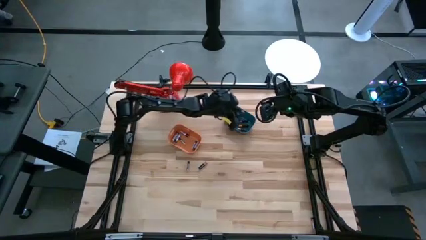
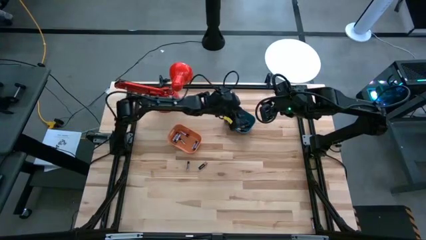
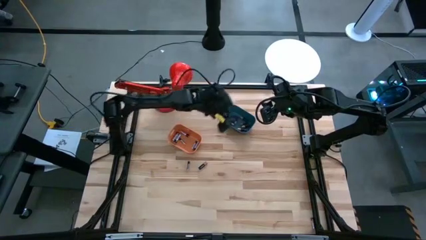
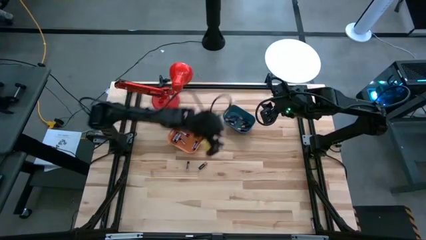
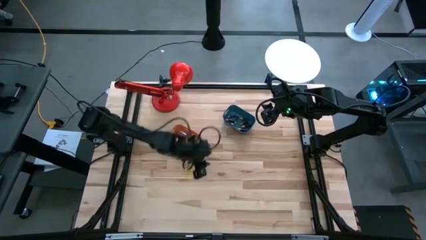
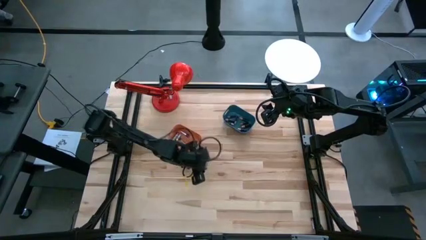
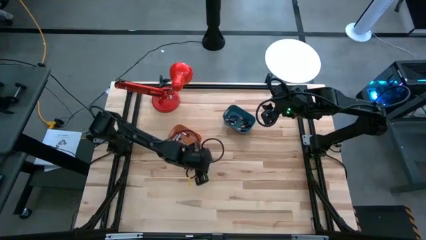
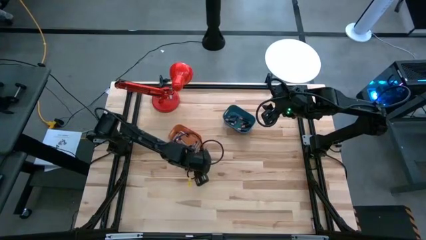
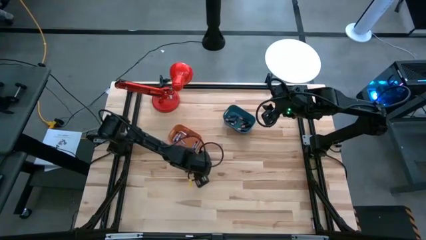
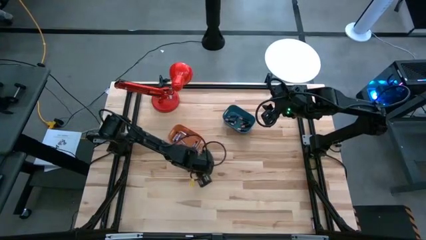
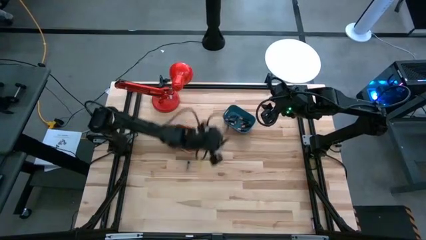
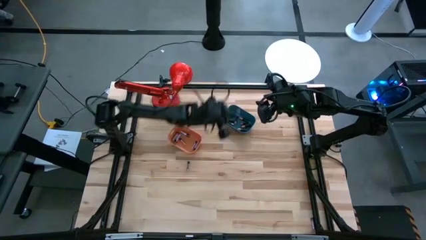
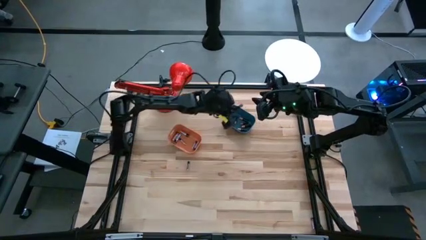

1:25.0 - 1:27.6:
Task: Sort batteries
Put the black battery into the blue bin

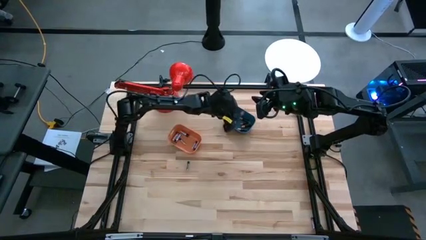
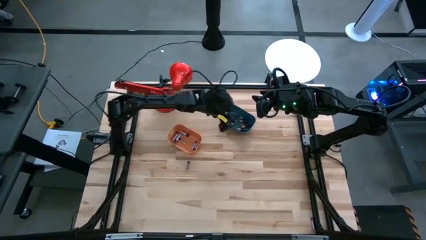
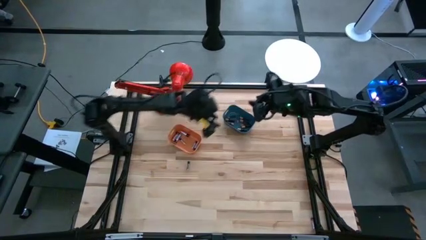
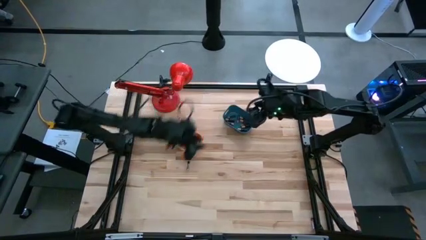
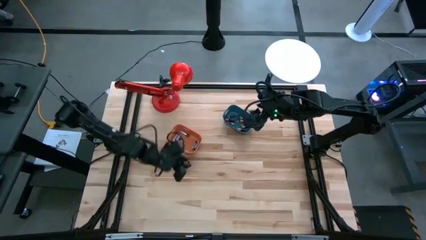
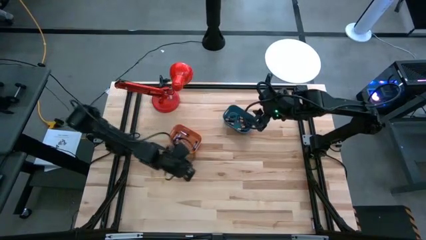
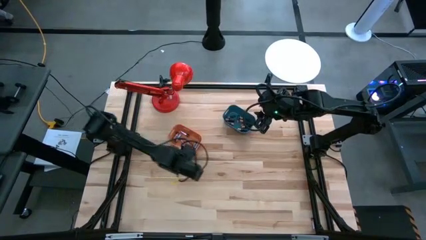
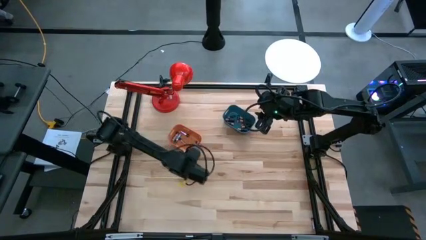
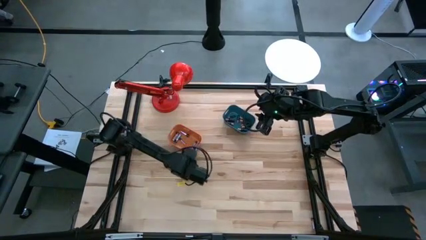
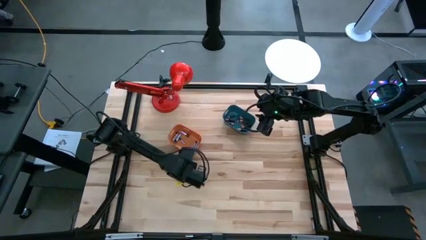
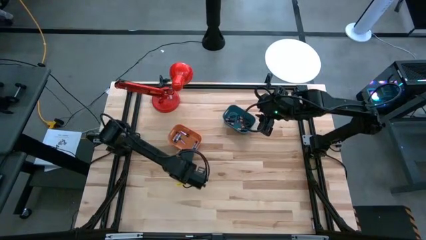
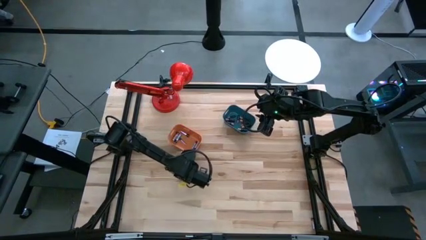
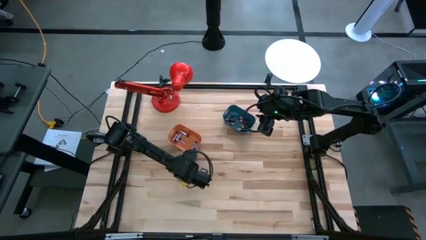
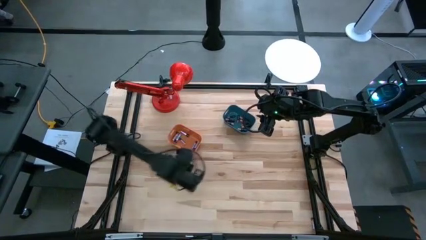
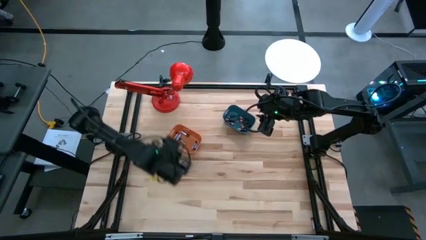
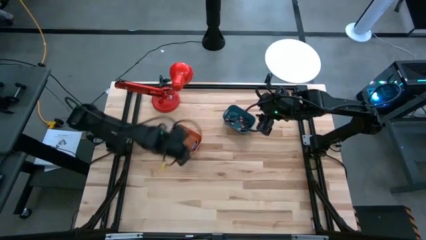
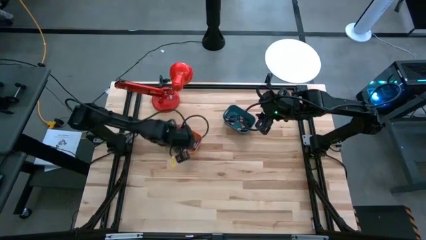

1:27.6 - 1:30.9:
Put the silver battery into the orange bin

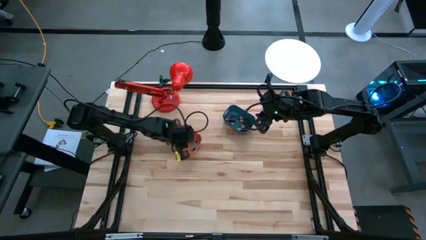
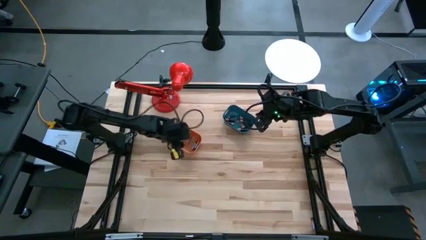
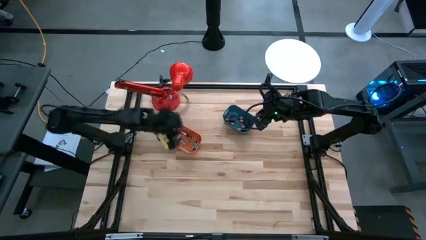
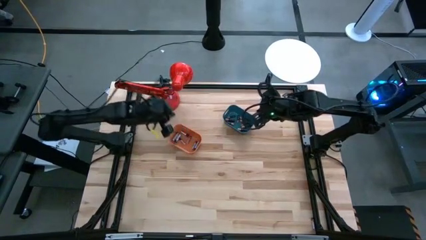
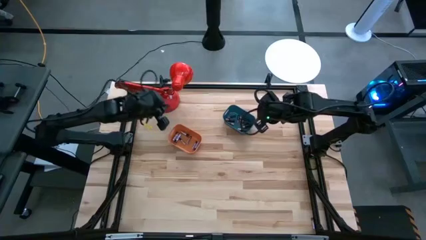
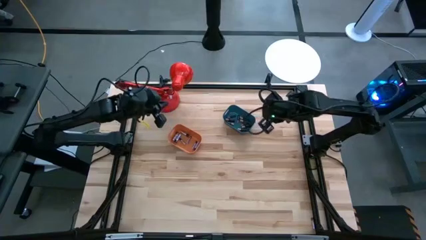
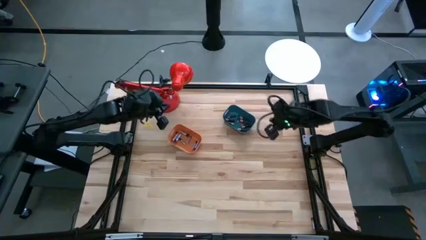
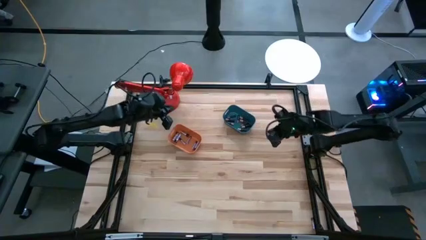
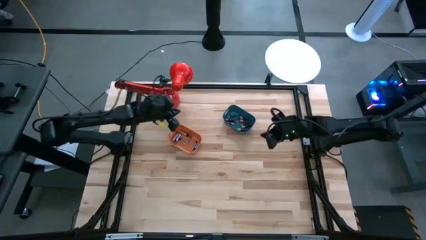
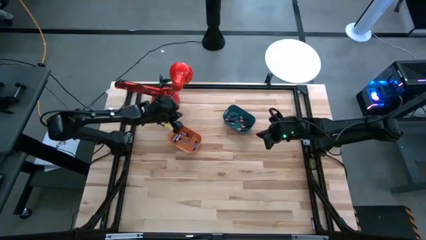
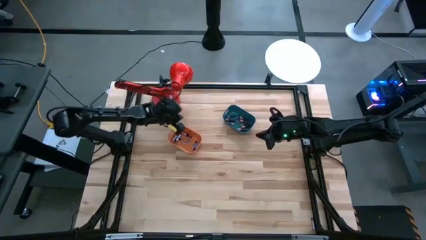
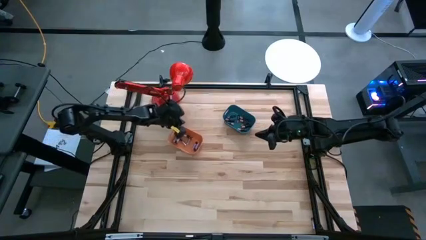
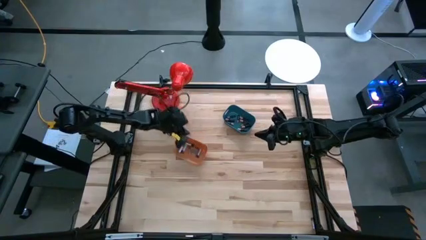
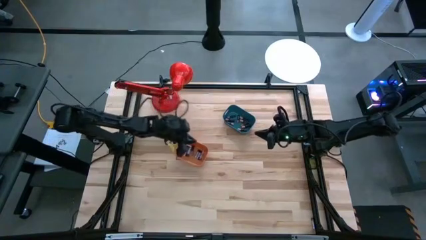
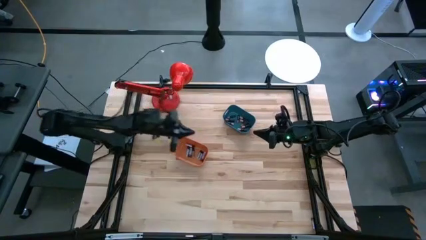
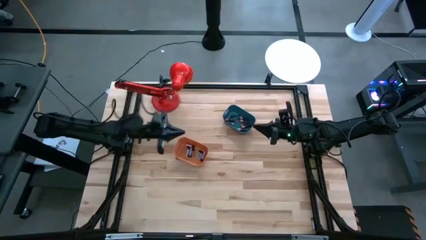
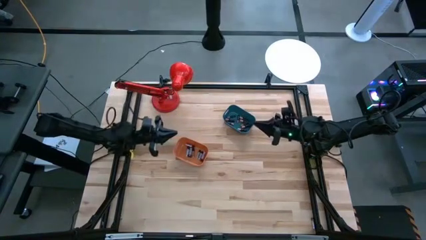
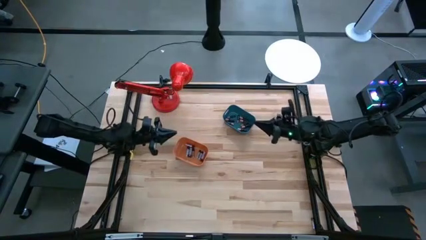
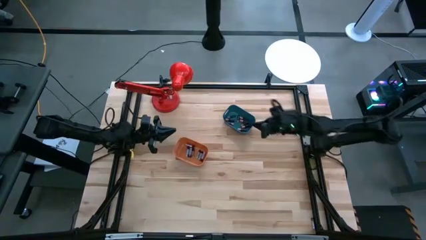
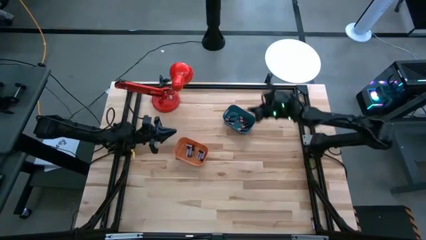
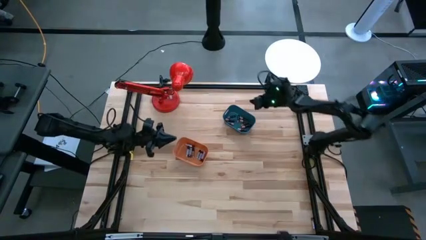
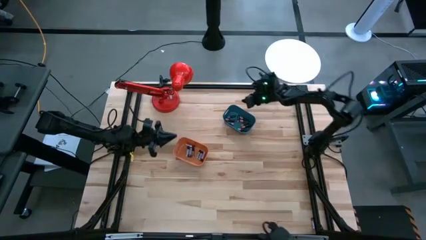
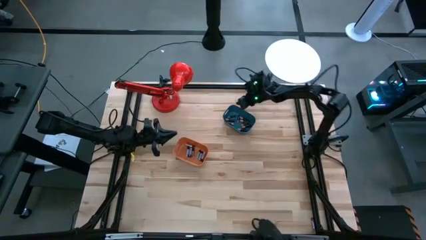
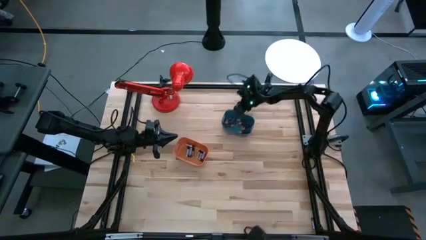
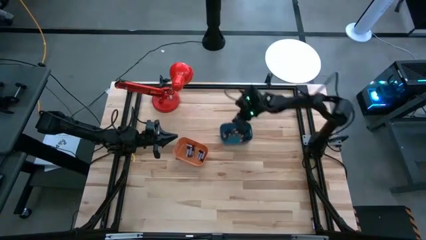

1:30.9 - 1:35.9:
Adjust the bins

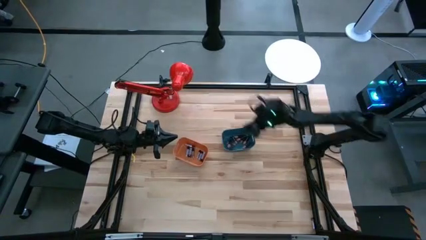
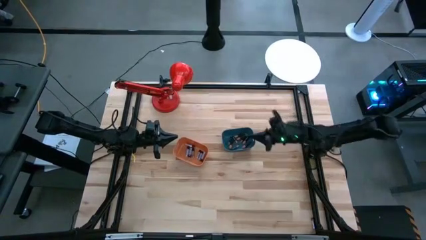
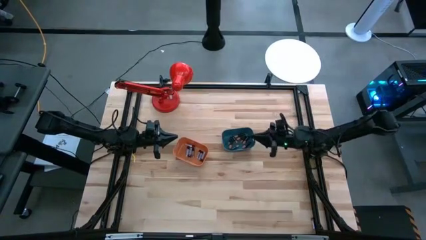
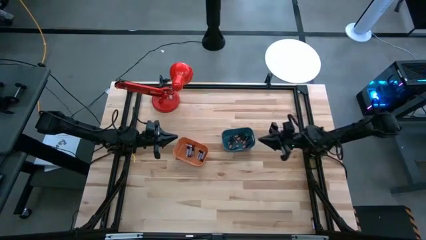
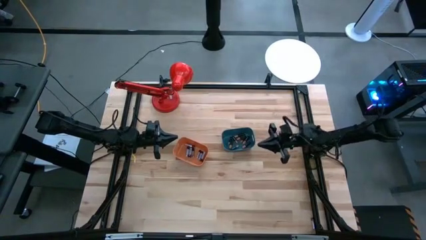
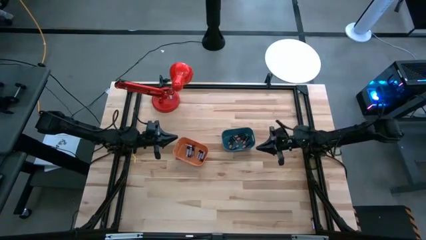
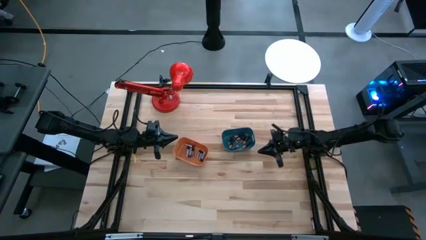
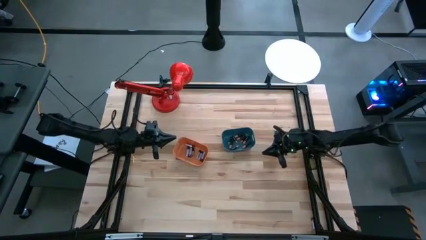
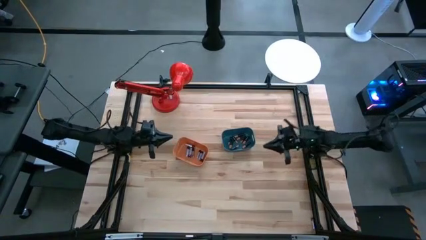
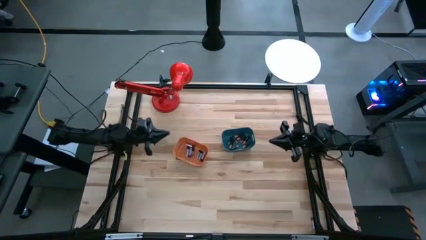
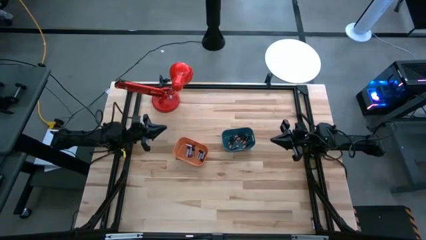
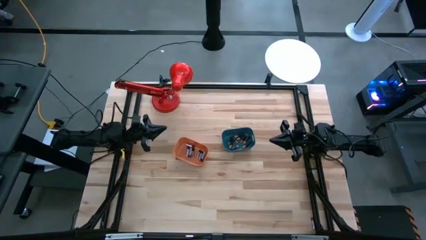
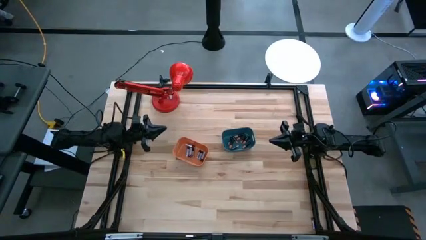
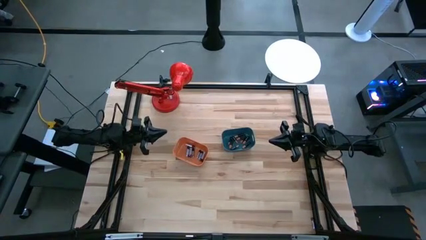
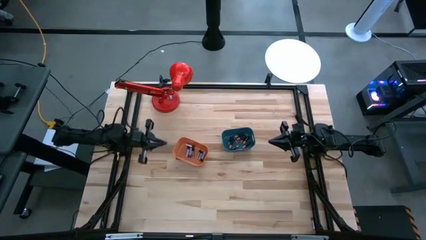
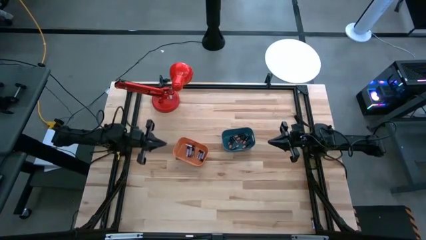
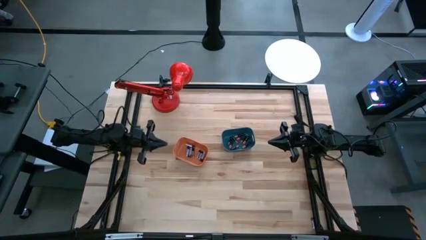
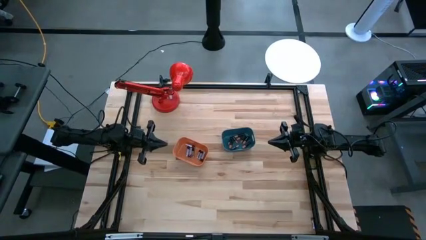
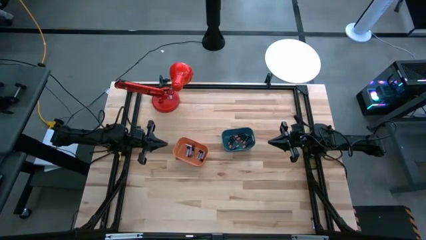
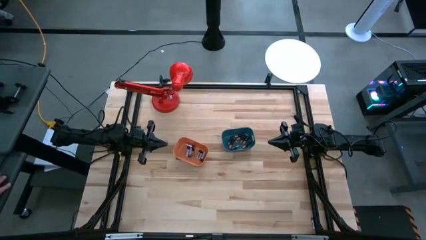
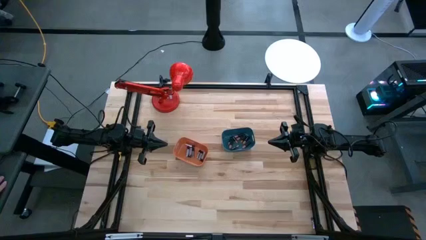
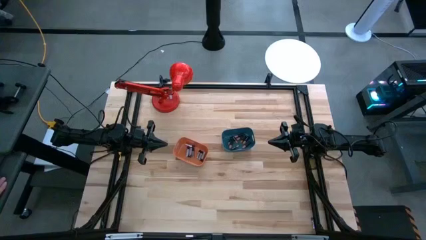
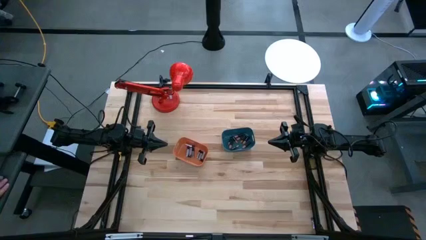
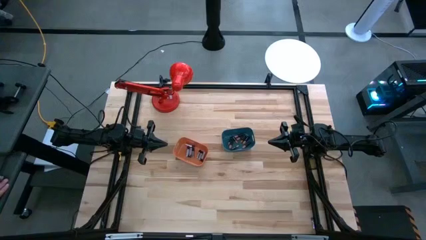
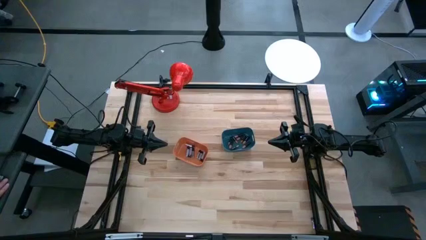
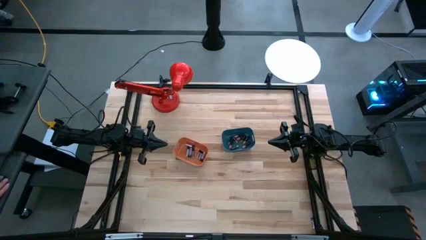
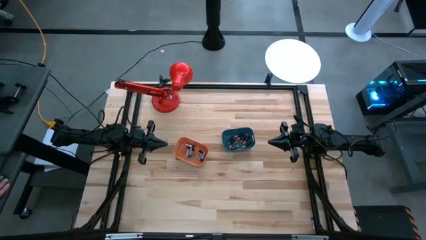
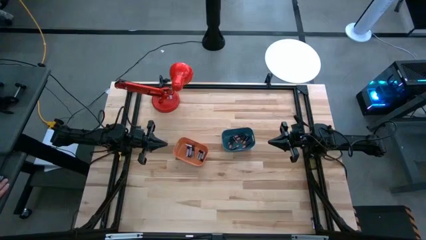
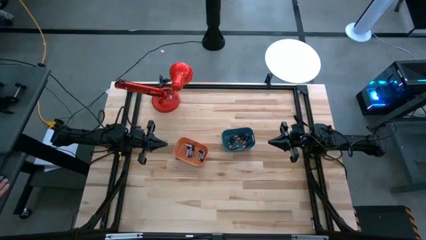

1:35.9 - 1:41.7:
Return to Home Position
